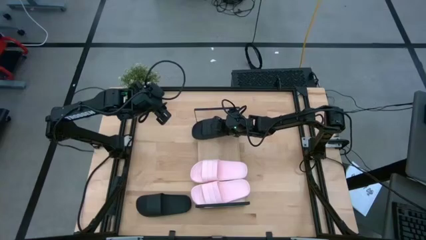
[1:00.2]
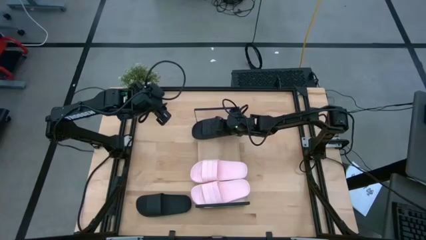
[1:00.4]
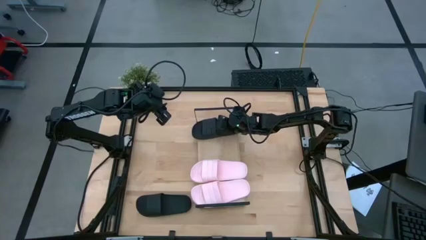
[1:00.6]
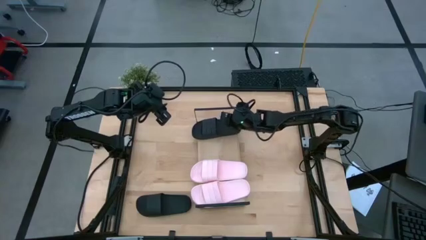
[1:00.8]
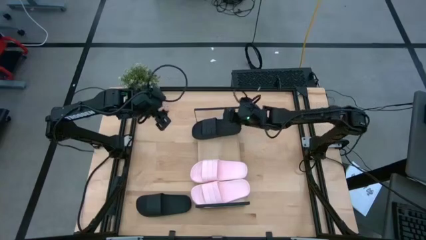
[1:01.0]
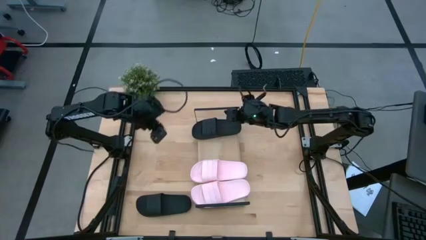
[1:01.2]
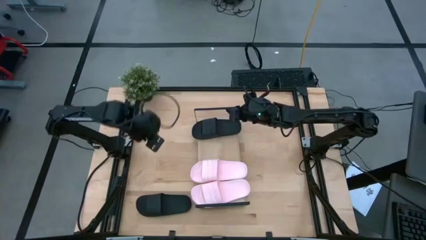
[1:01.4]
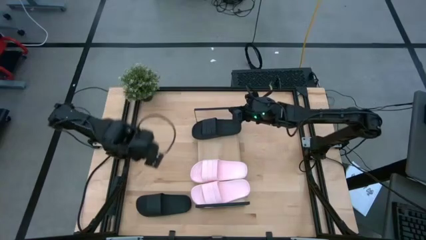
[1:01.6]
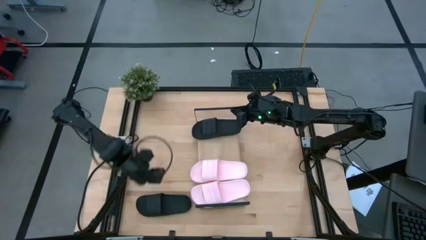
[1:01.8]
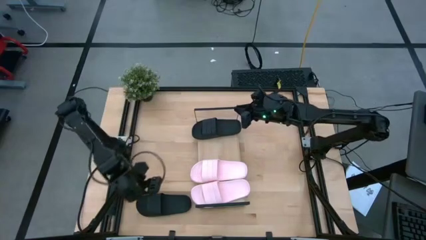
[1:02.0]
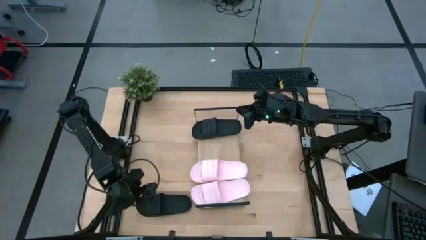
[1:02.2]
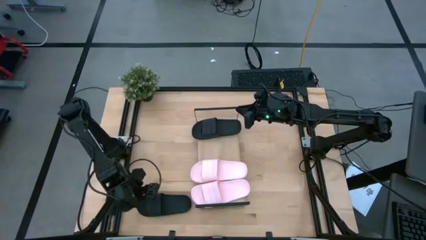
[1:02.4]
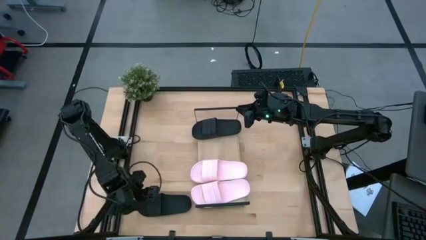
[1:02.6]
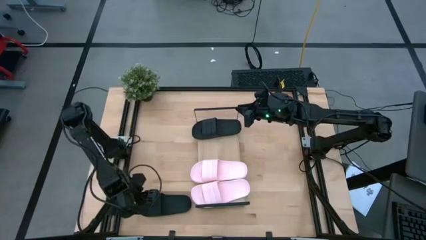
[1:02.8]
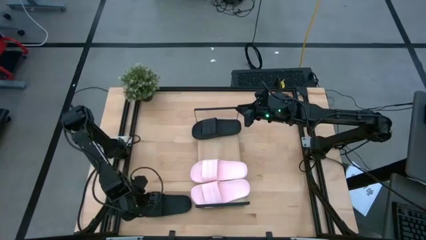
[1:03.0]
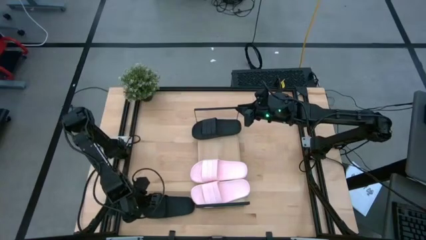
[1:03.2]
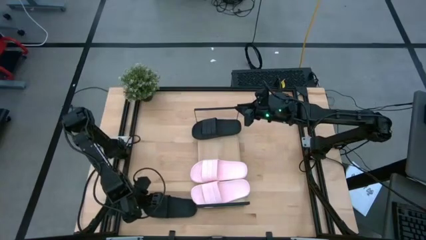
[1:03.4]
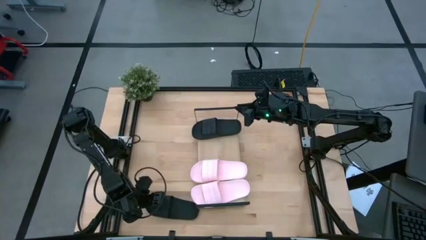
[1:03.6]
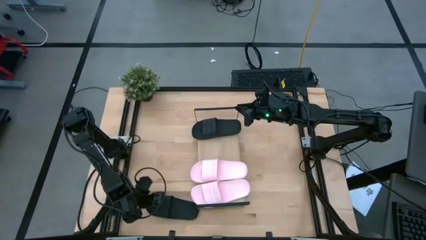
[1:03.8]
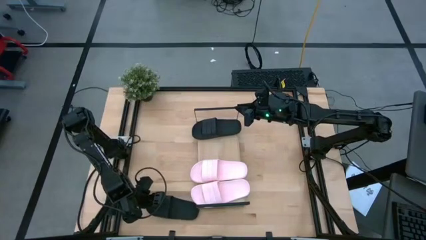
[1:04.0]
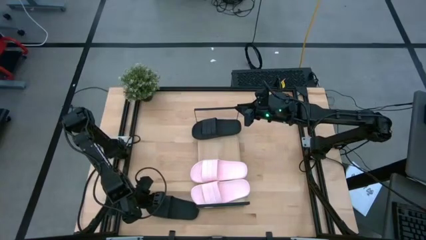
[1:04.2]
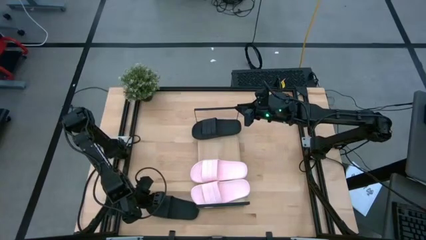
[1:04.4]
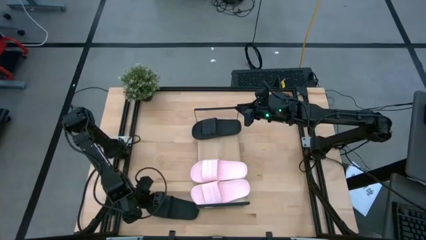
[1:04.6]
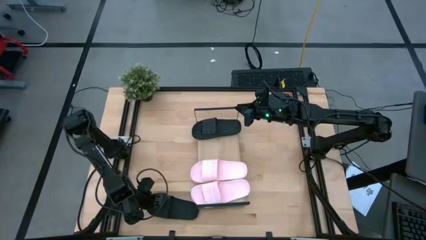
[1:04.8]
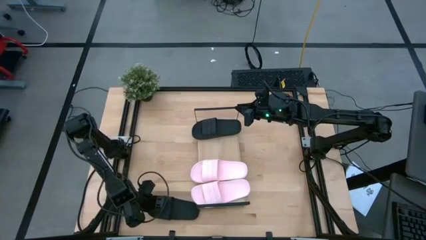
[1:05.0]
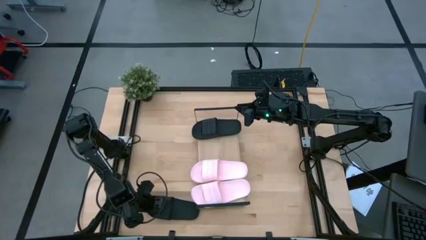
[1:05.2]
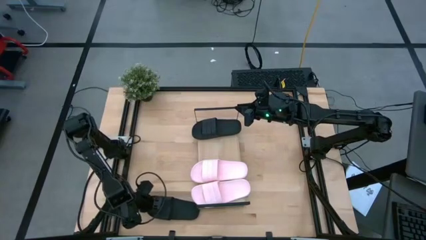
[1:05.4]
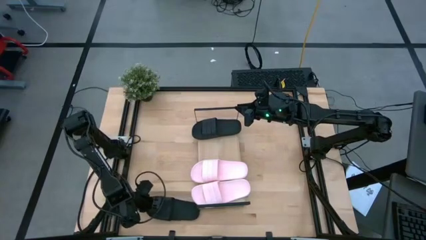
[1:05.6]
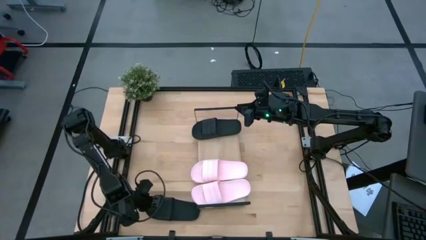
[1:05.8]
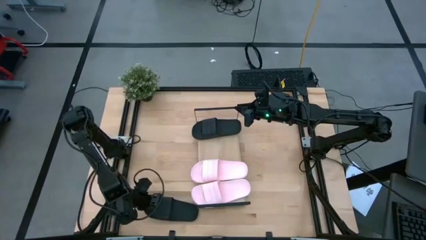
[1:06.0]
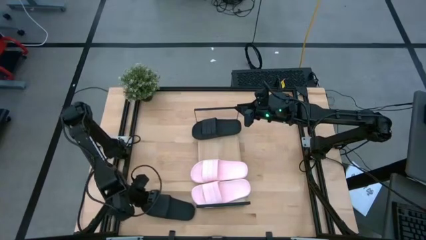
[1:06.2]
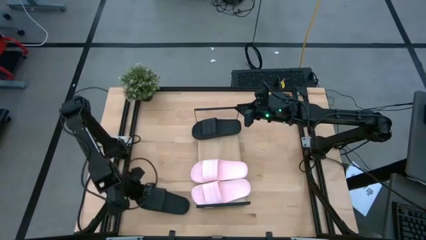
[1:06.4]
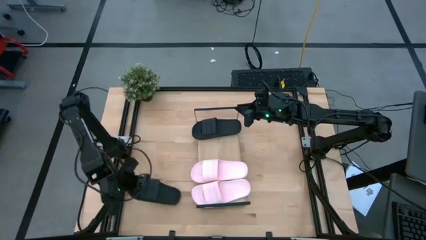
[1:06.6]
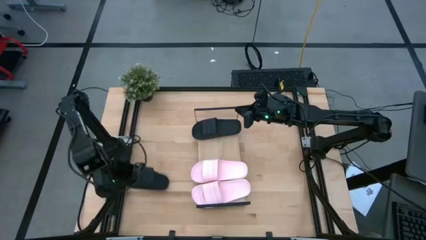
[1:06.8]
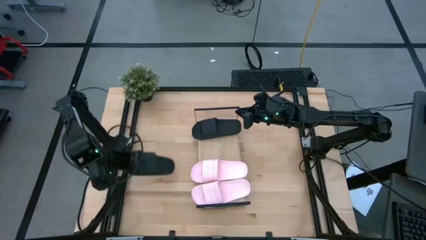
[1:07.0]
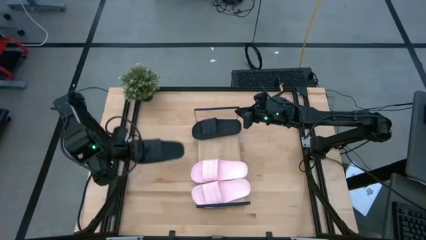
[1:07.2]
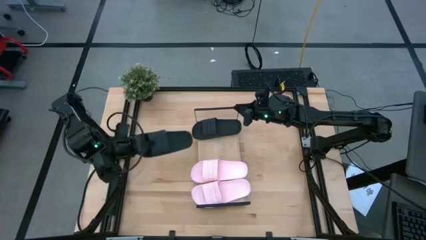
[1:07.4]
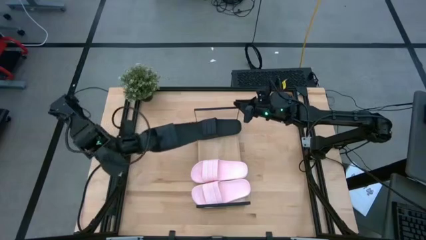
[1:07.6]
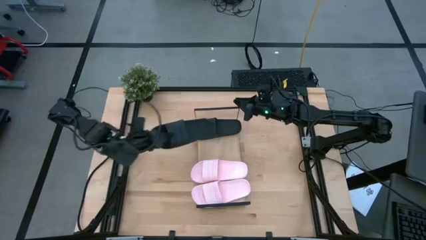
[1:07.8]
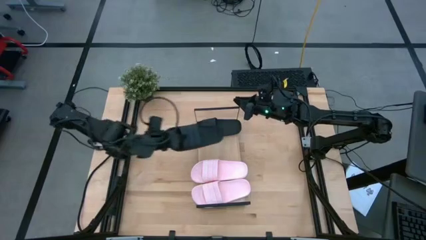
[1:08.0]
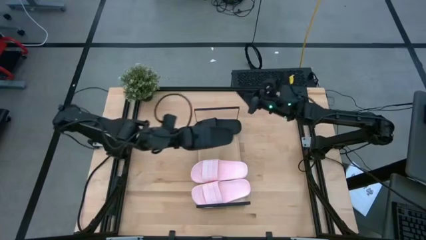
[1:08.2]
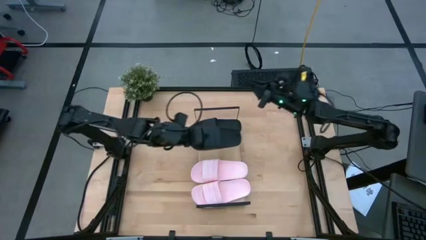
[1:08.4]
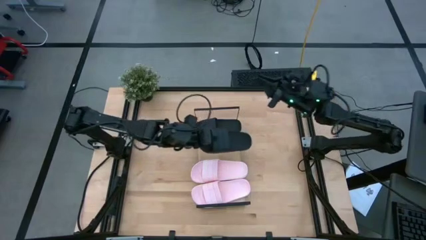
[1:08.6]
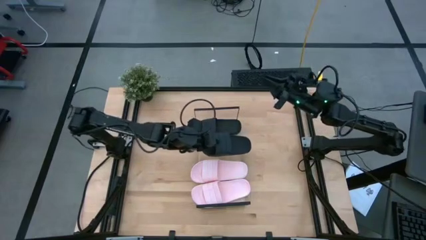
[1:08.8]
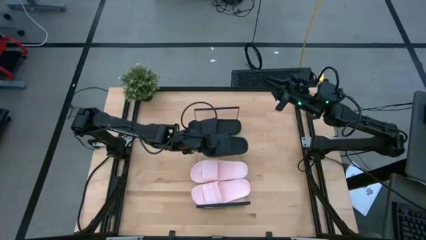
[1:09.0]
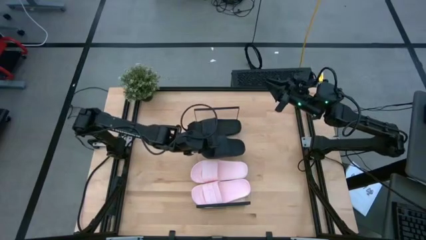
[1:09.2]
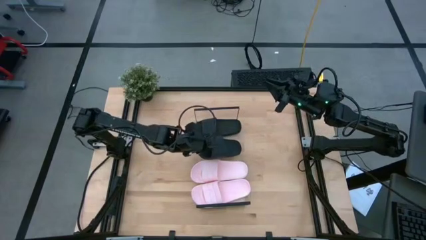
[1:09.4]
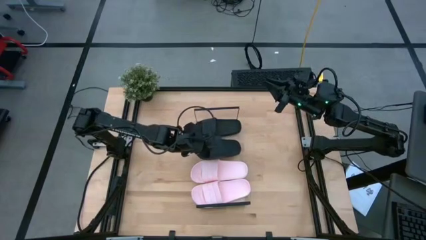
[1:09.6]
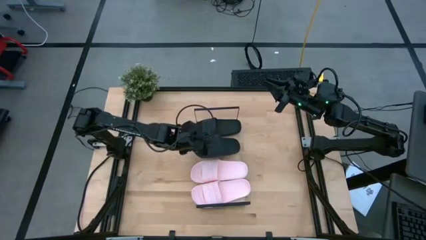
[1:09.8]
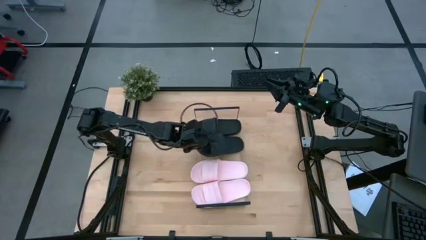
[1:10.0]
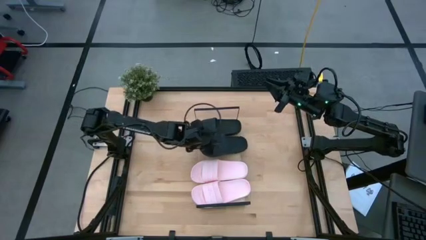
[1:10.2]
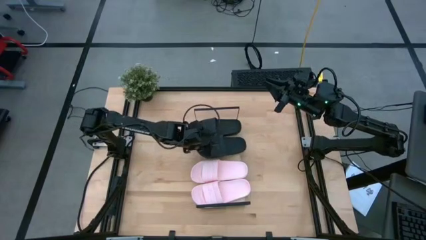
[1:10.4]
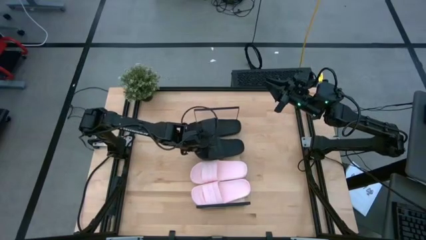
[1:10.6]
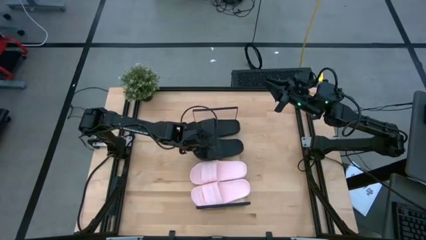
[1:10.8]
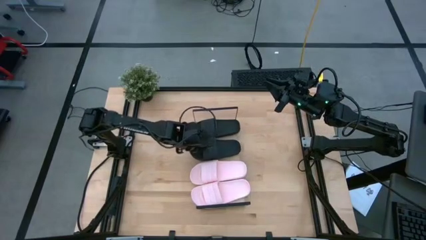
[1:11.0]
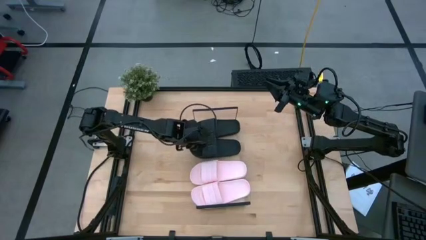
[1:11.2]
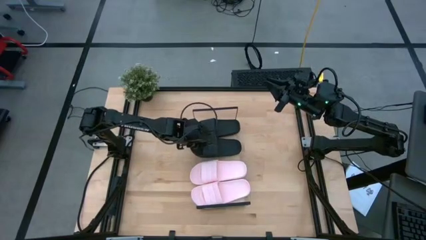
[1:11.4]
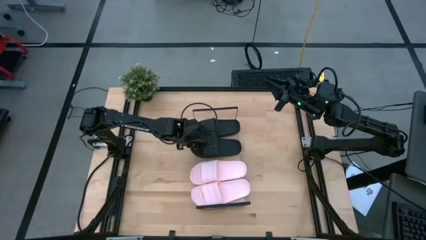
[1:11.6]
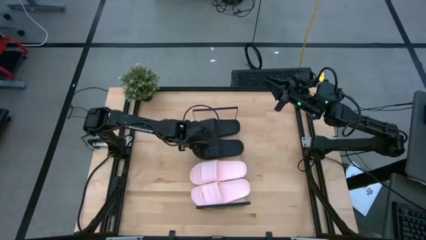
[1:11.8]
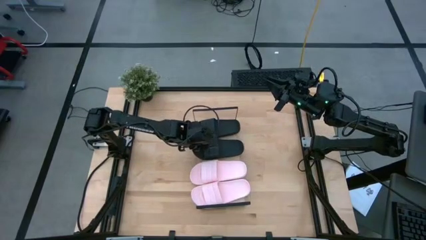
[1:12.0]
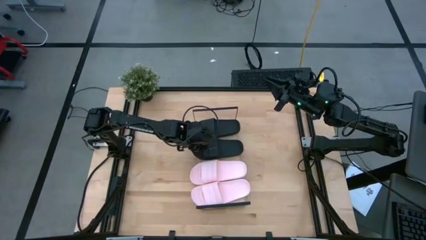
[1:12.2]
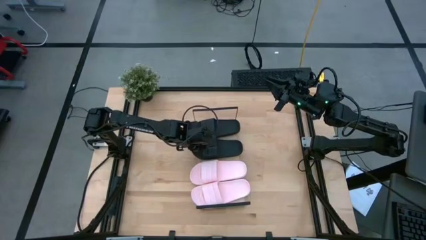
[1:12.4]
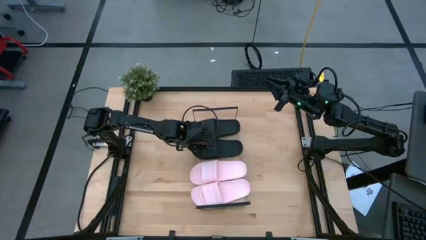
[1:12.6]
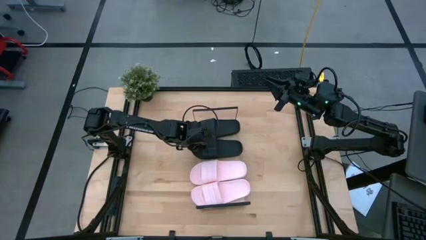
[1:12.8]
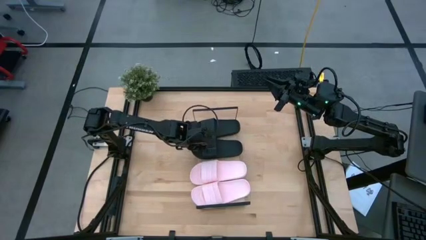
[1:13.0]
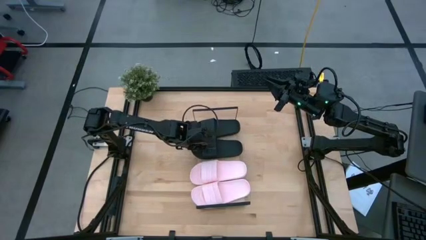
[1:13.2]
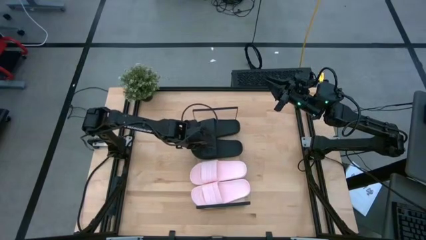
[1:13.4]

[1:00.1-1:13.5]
Task: Pick and place slides into the shelf
Put the black slipper on the shelf
